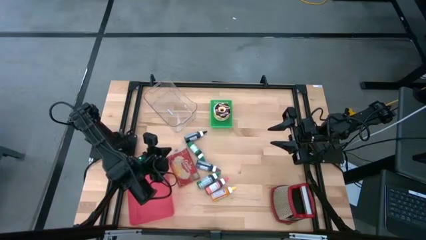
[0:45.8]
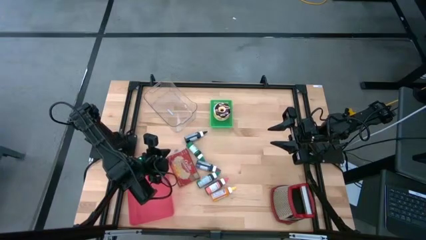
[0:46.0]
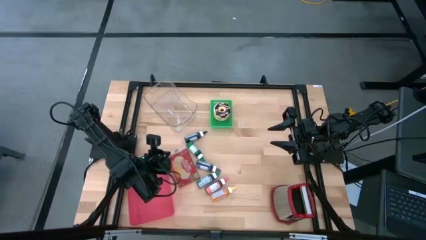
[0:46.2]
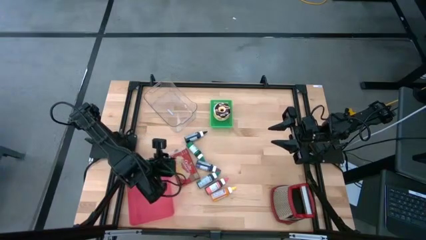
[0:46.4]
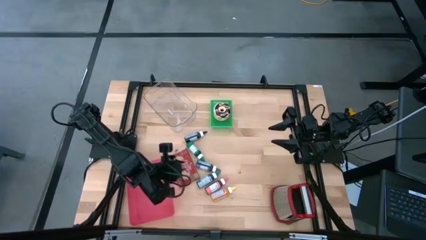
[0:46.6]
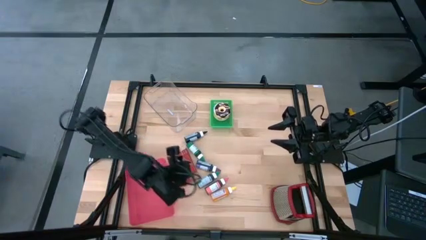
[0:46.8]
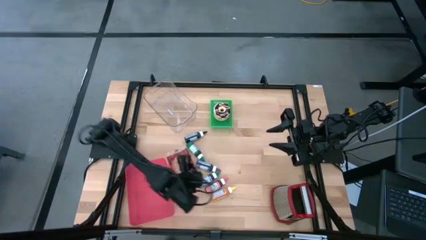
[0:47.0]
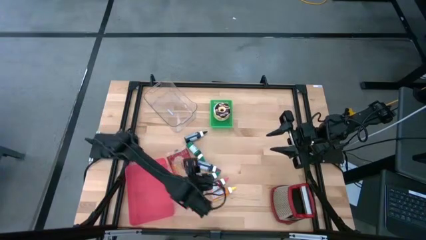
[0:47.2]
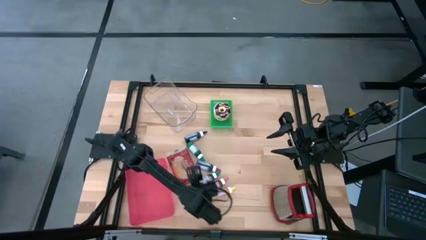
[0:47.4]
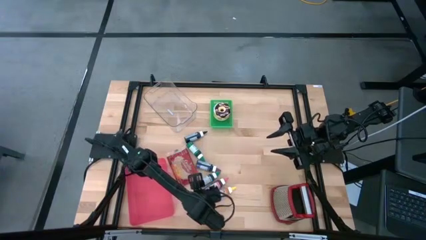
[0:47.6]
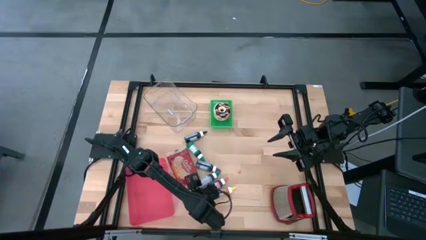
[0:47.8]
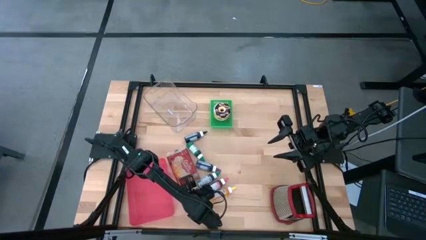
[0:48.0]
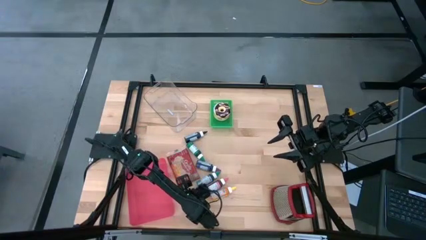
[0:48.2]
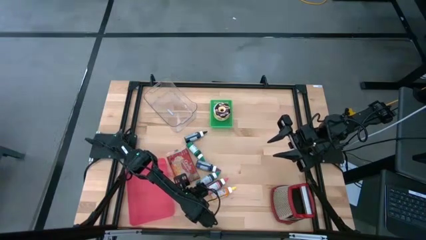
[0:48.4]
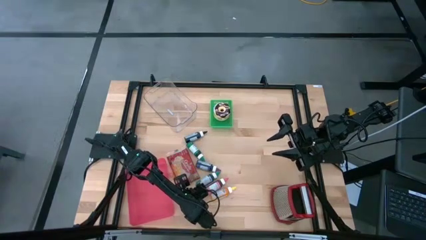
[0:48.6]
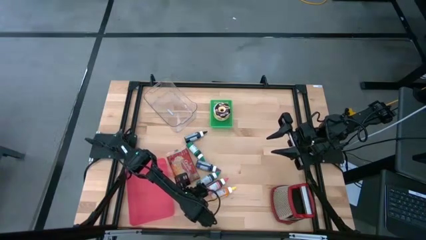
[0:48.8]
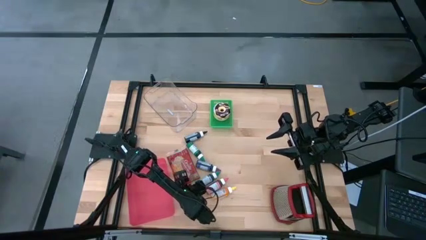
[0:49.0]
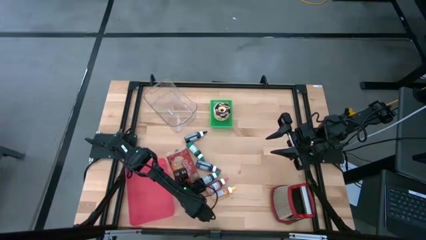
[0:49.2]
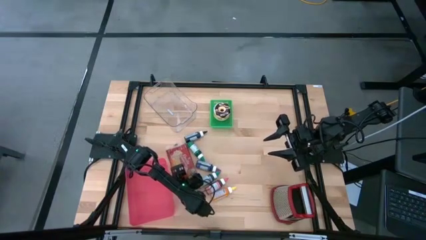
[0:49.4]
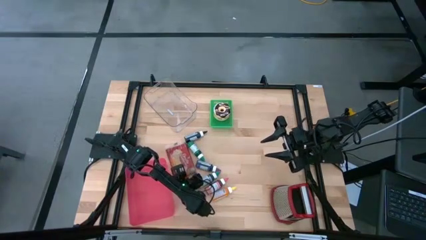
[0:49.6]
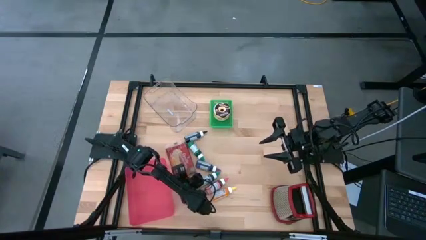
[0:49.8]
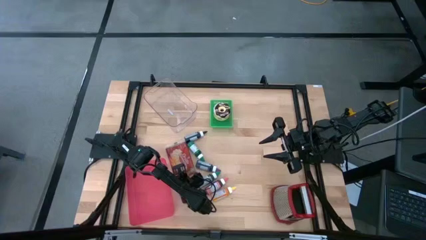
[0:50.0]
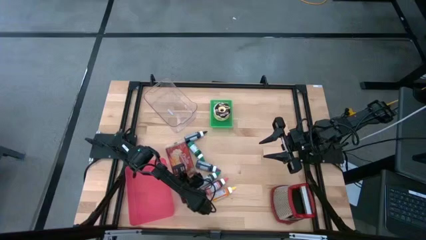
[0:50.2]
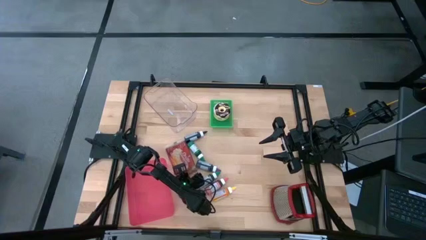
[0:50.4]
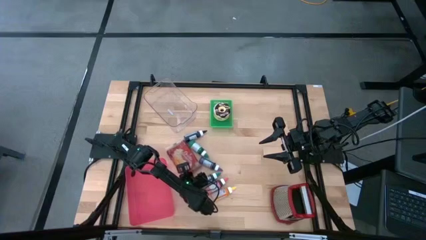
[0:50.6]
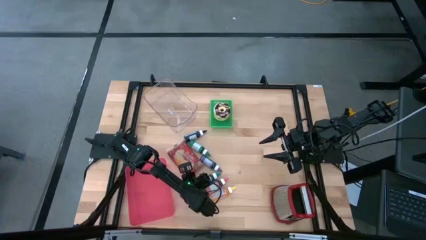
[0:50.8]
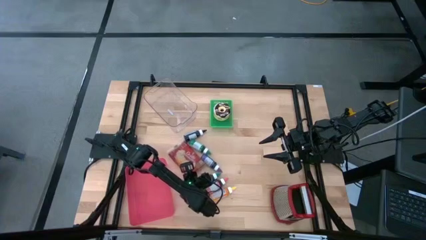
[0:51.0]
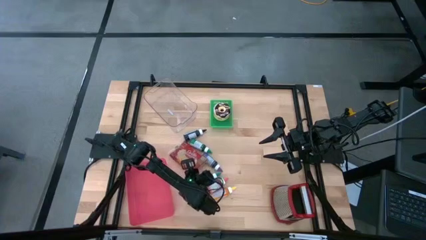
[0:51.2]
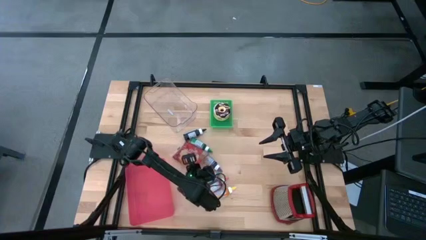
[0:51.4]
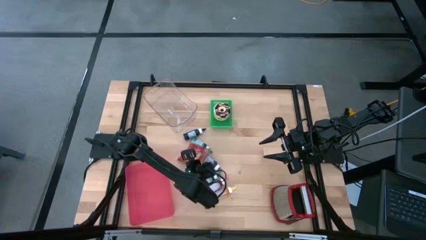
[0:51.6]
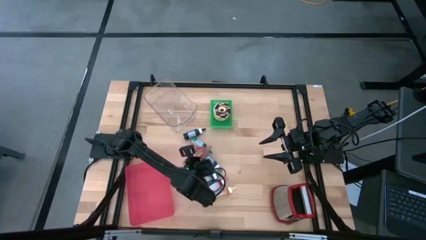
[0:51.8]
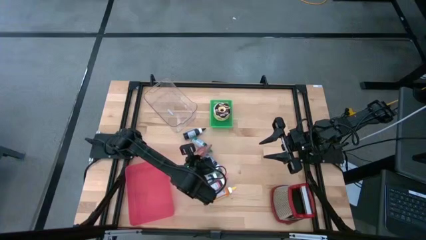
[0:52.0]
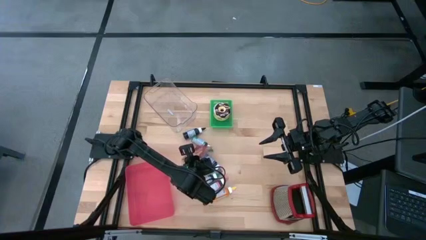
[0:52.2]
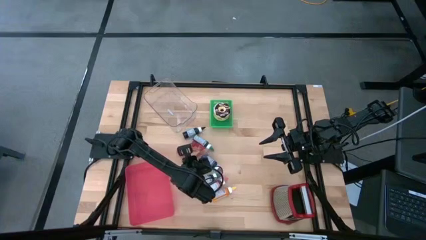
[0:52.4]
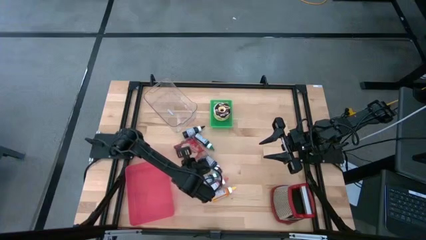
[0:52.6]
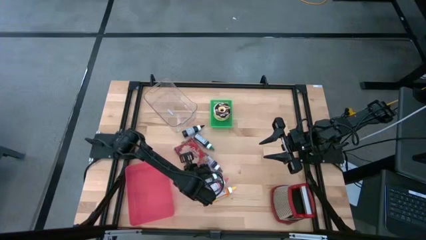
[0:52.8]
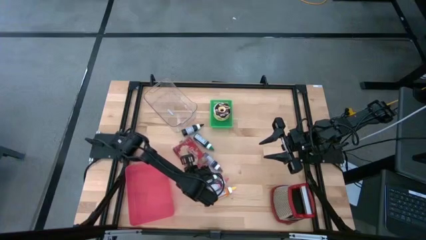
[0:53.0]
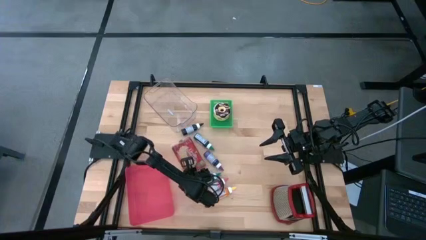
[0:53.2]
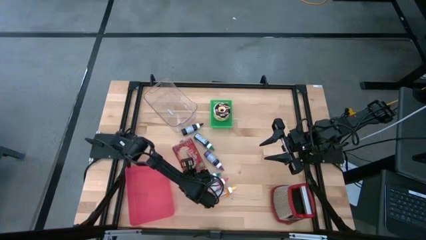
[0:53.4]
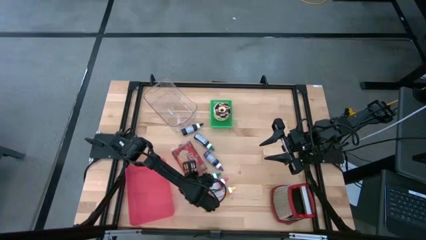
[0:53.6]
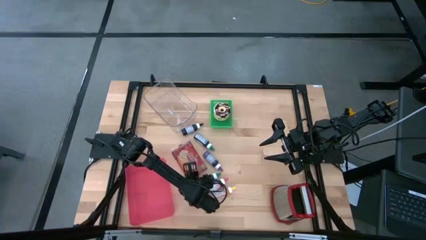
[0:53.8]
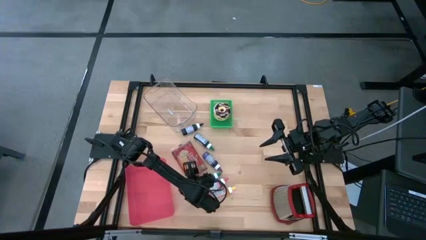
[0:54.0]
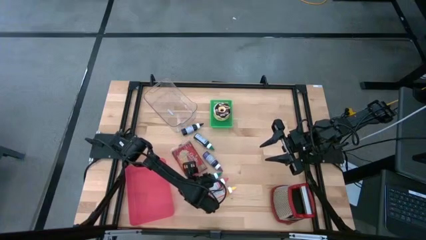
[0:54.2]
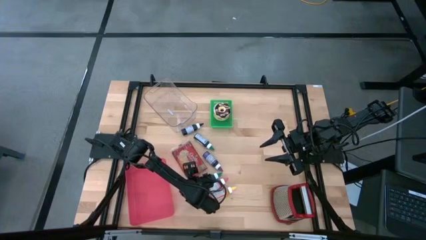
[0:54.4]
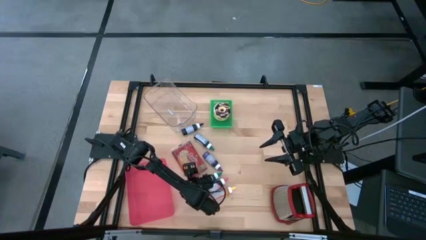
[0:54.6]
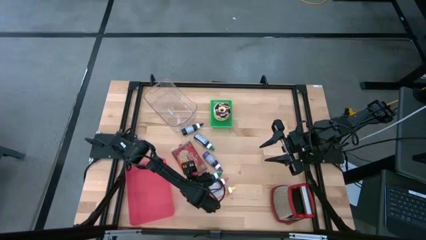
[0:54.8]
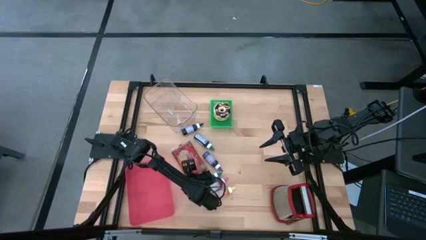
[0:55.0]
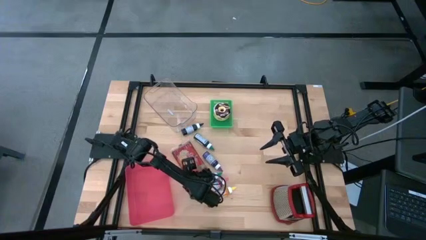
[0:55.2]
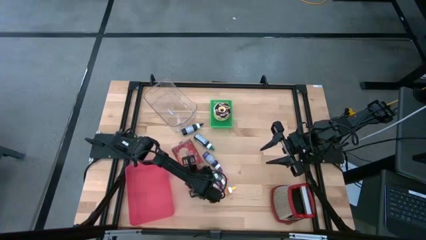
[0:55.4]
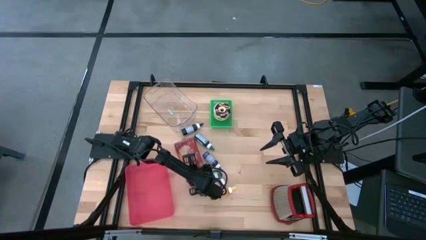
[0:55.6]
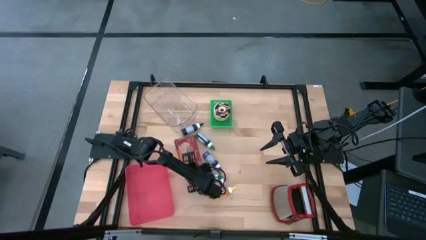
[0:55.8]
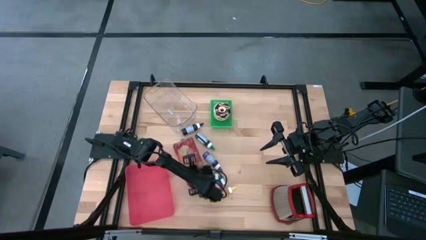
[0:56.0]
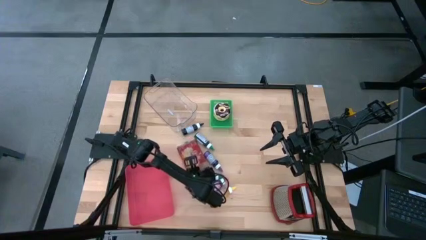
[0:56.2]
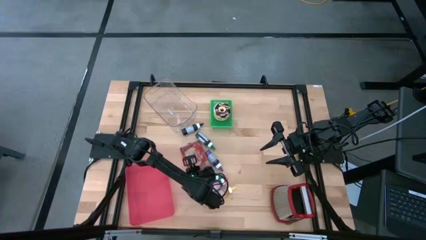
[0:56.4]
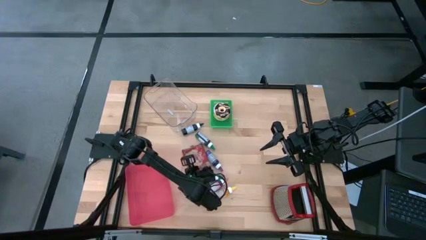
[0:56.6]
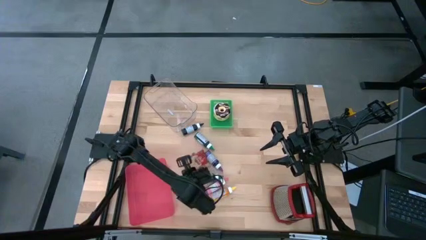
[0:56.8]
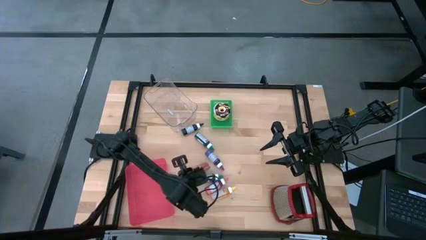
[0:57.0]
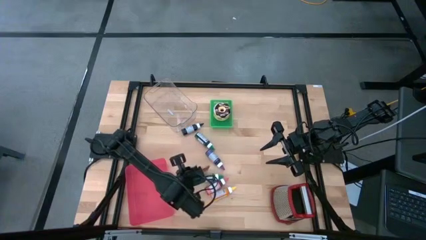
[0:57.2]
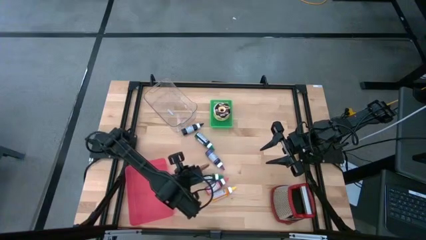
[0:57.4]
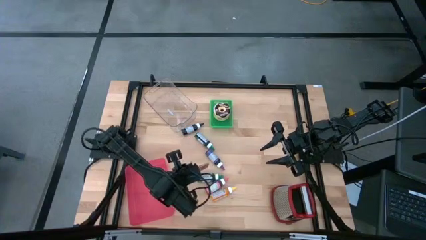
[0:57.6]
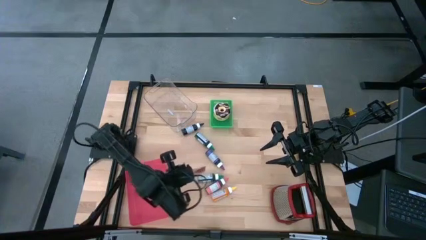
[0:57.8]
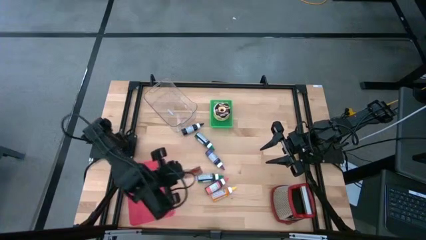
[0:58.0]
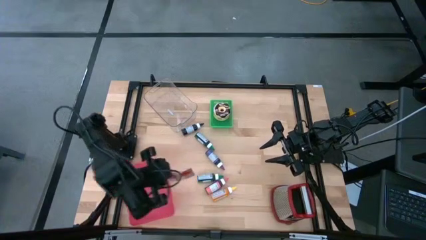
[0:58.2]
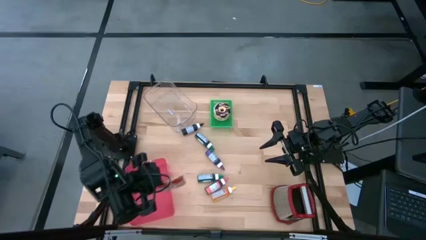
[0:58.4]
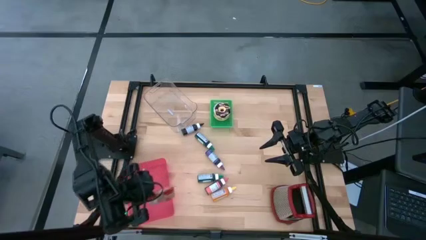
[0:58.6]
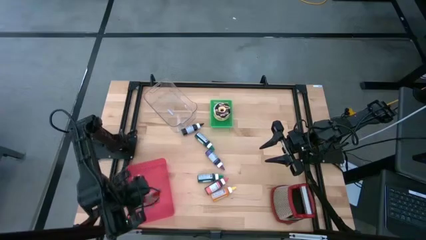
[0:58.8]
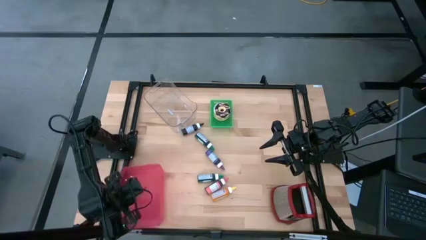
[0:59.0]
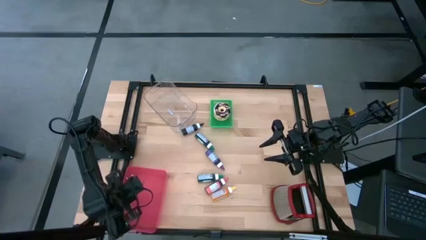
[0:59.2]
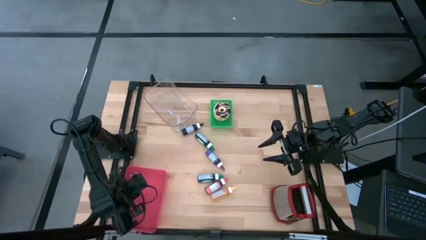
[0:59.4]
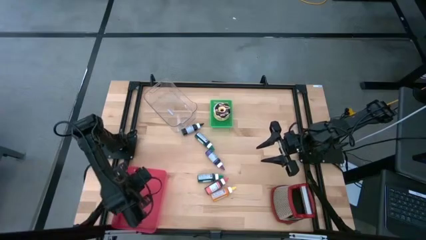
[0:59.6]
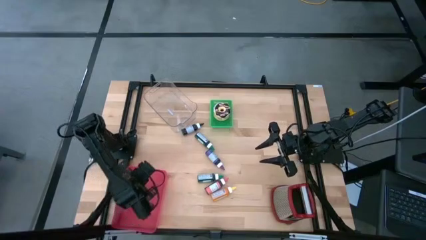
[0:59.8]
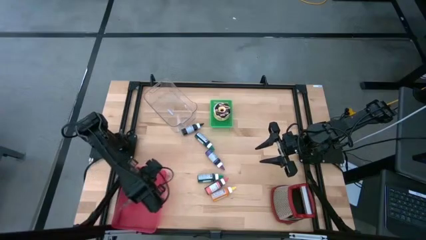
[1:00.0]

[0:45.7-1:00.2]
Put the red popcorn bag into the pink bin
